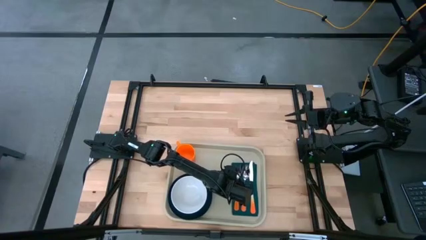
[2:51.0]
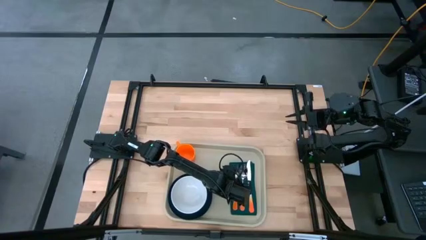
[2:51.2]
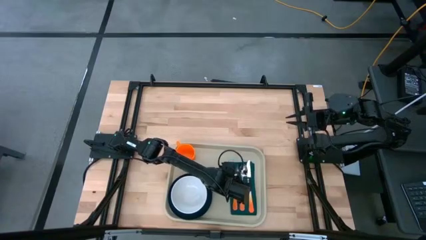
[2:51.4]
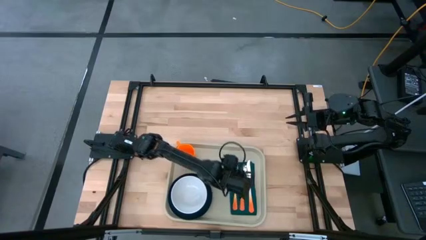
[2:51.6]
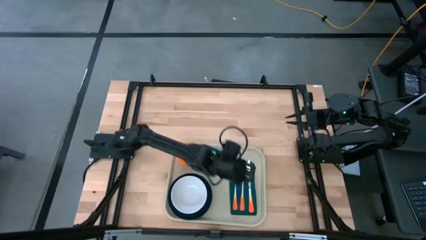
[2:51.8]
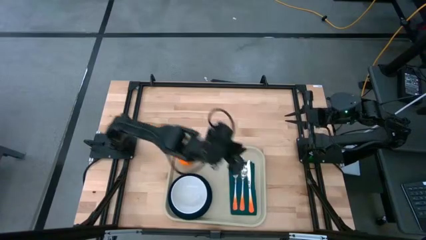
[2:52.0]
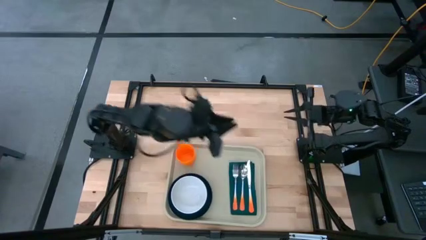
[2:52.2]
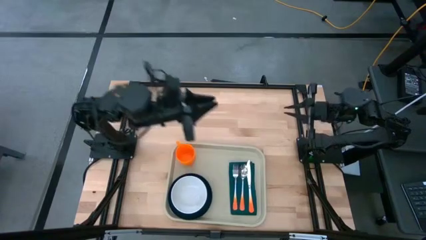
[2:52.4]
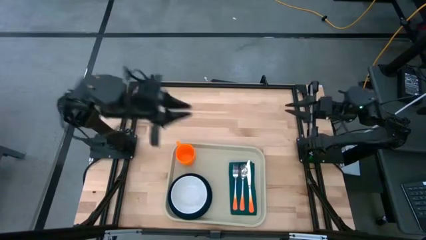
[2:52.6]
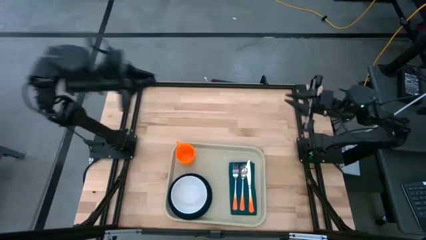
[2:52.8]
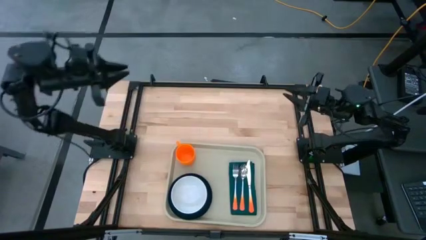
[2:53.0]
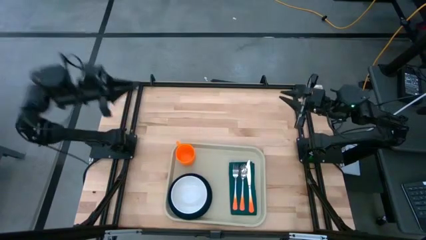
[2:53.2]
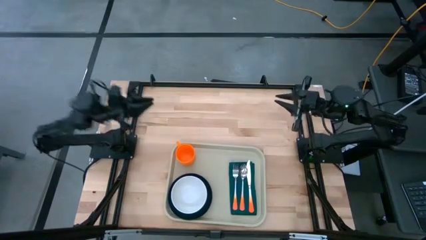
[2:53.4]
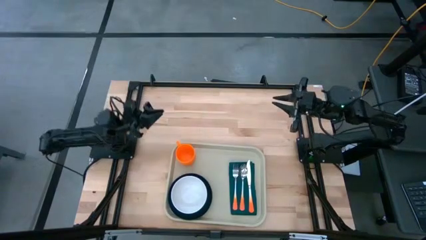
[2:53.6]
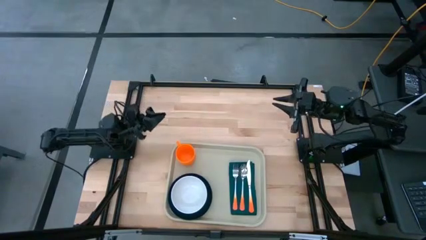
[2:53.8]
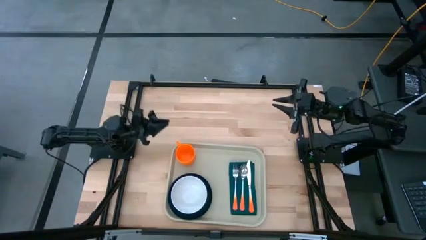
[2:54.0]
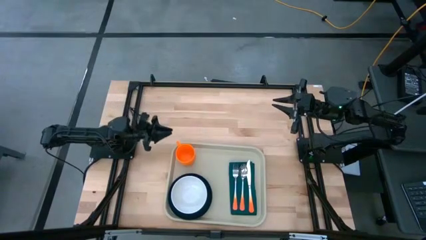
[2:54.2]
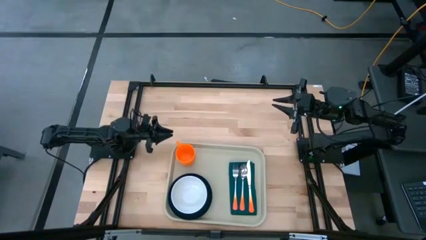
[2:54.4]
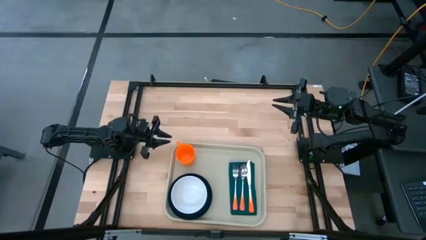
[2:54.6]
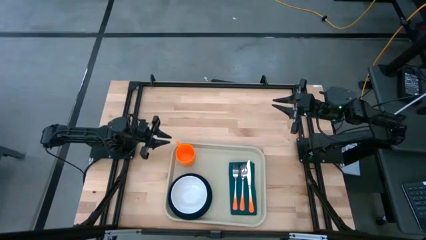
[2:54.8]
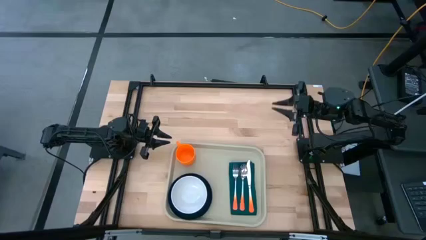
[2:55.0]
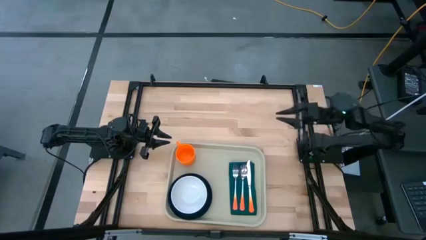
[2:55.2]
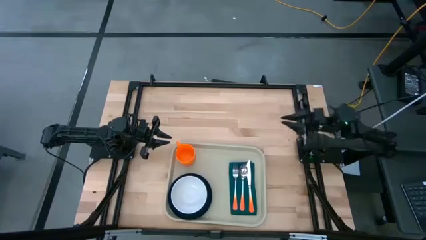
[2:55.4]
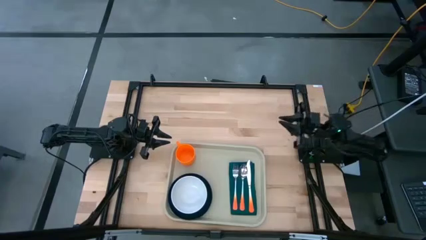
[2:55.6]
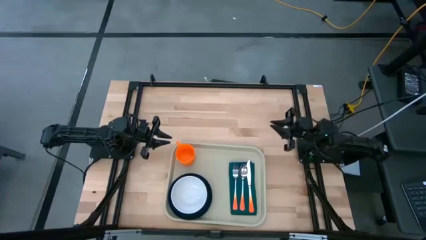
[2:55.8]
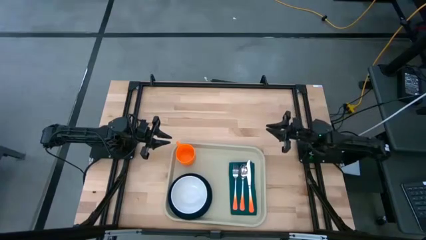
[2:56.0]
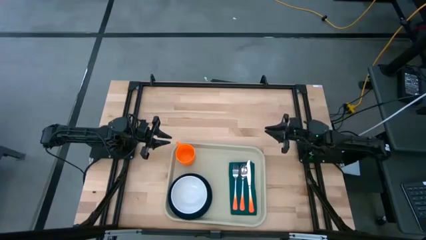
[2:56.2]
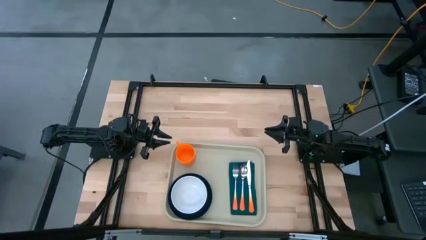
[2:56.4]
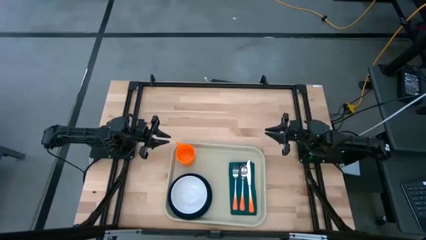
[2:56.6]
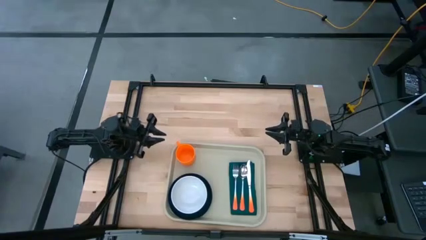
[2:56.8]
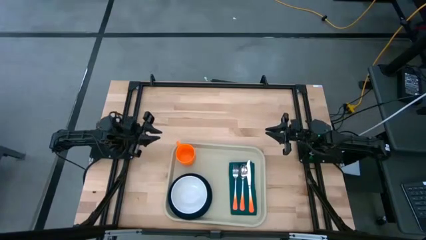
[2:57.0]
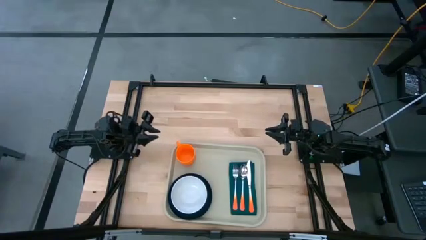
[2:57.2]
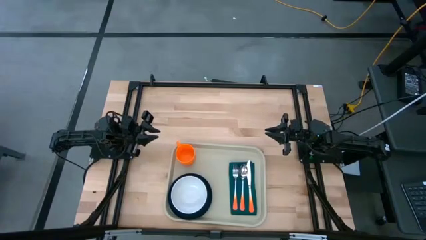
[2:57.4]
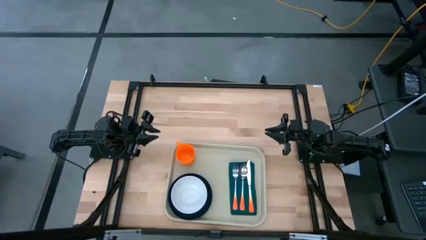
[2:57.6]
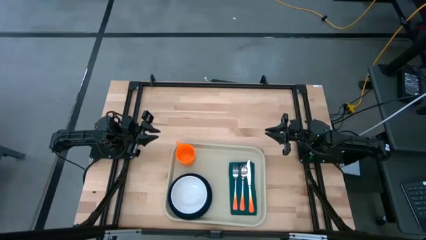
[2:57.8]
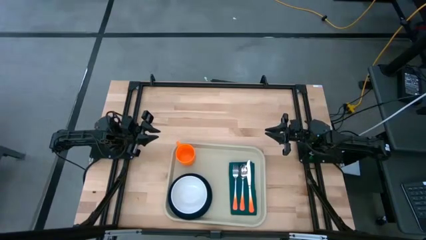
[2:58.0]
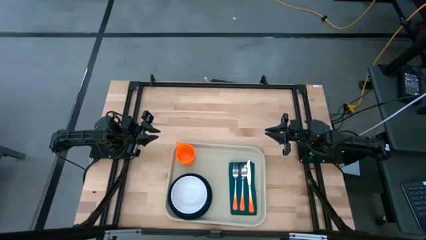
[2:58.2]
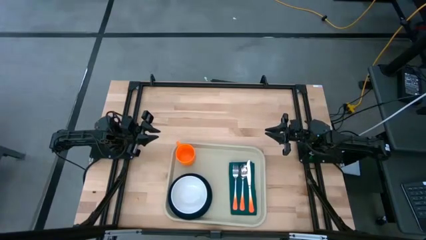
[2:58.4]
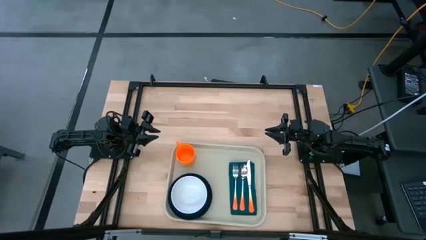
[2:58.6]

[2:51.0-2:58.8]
Task: Set up tray
Return to Home Position

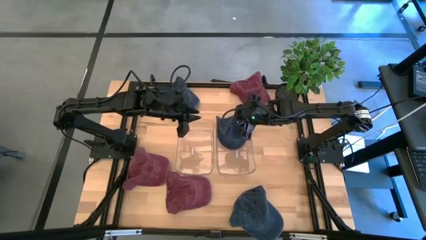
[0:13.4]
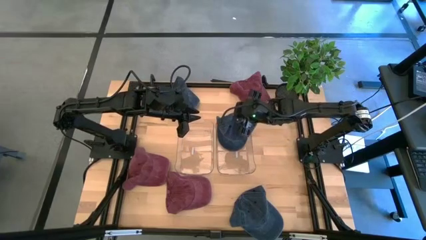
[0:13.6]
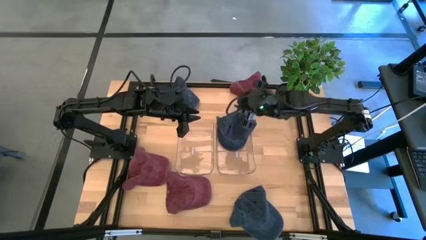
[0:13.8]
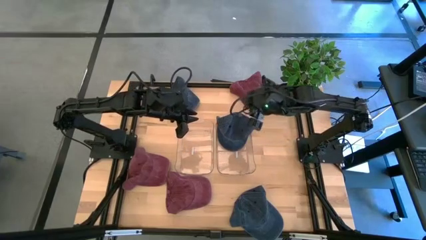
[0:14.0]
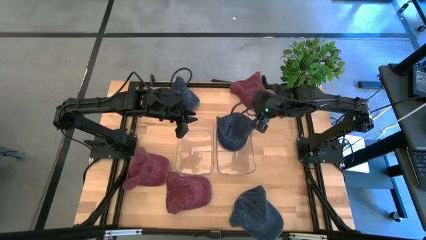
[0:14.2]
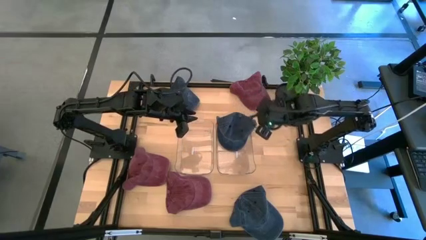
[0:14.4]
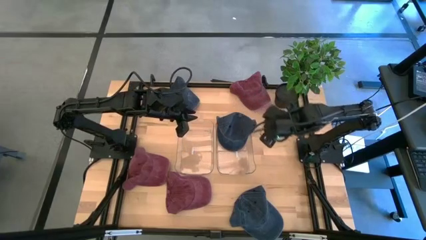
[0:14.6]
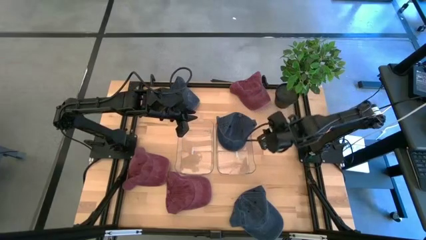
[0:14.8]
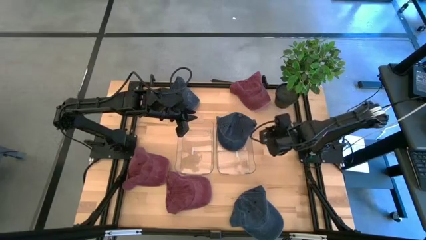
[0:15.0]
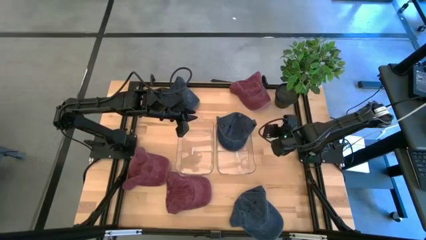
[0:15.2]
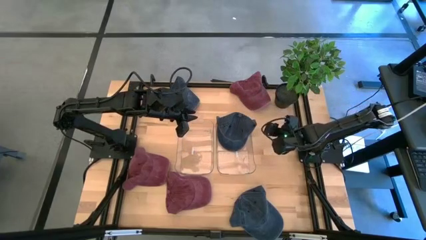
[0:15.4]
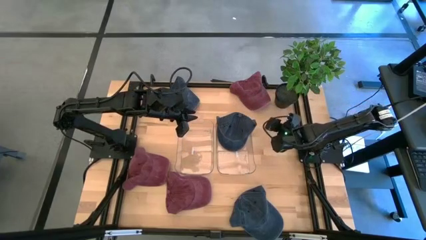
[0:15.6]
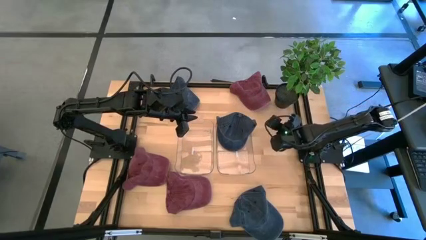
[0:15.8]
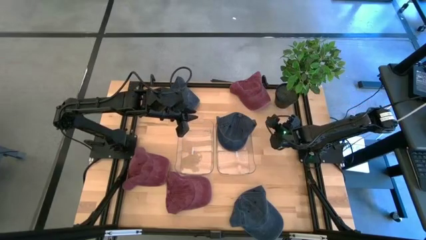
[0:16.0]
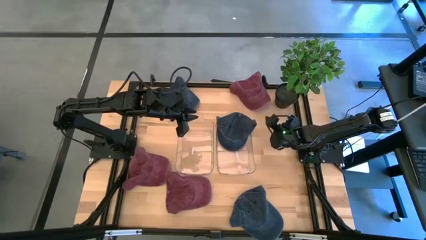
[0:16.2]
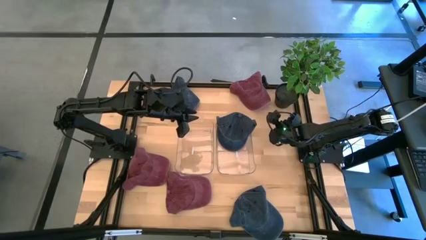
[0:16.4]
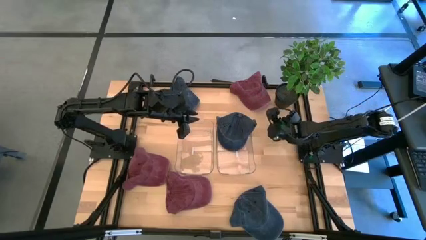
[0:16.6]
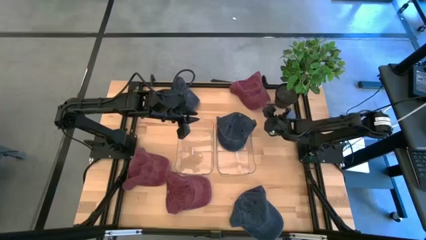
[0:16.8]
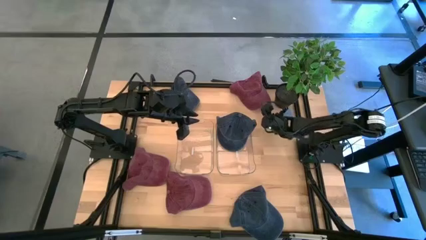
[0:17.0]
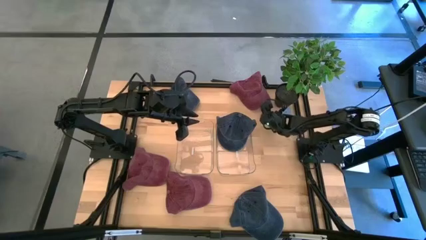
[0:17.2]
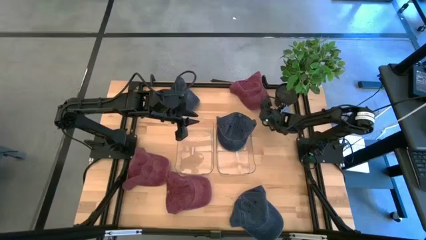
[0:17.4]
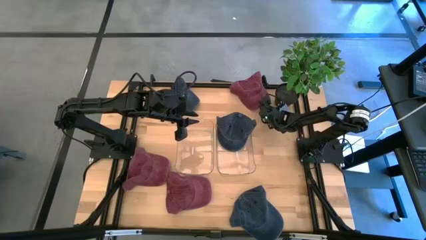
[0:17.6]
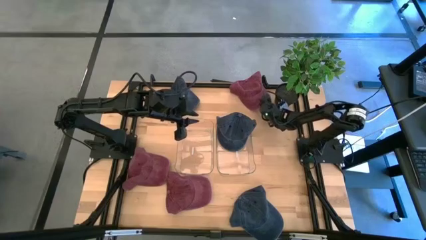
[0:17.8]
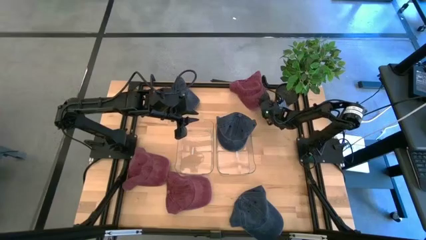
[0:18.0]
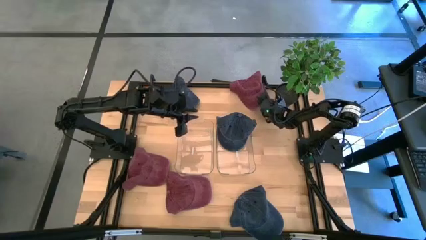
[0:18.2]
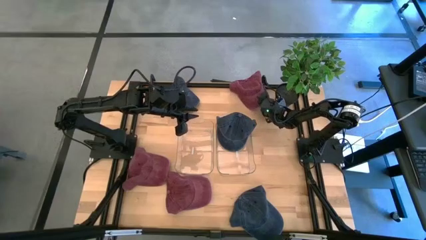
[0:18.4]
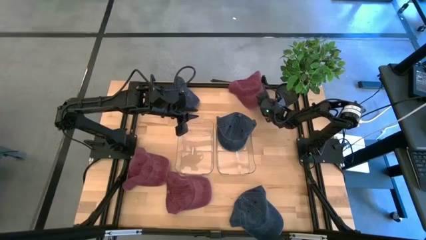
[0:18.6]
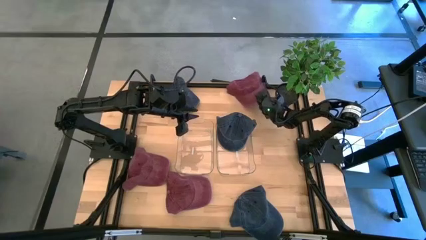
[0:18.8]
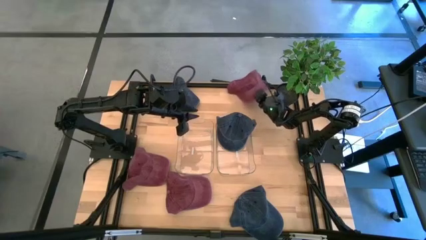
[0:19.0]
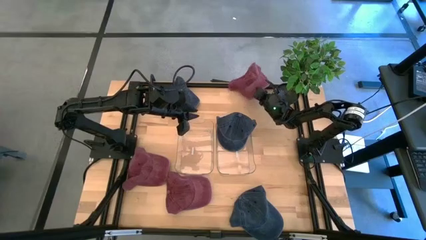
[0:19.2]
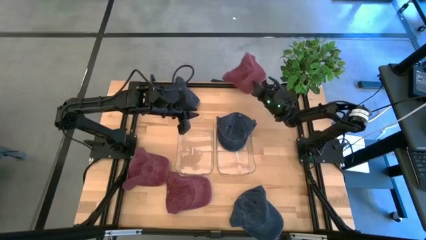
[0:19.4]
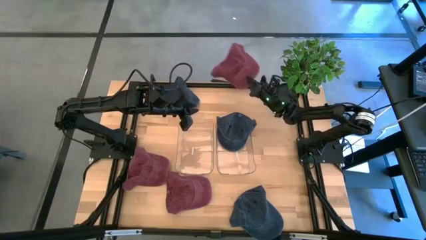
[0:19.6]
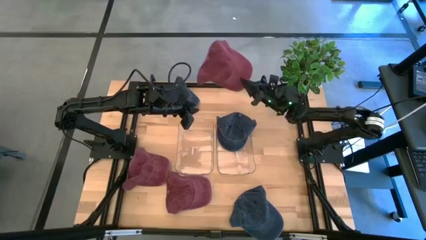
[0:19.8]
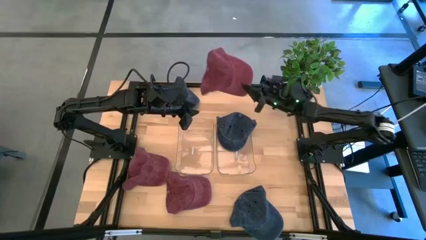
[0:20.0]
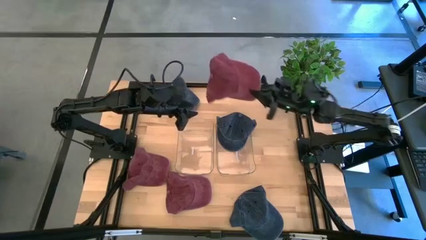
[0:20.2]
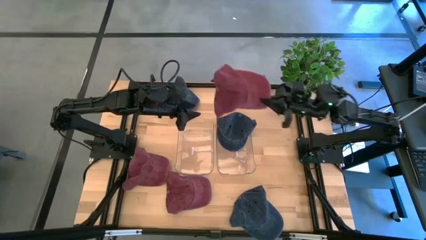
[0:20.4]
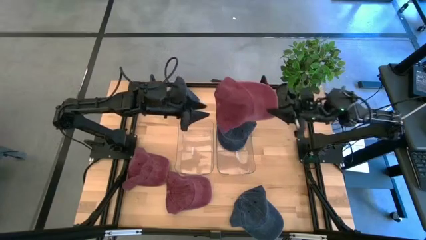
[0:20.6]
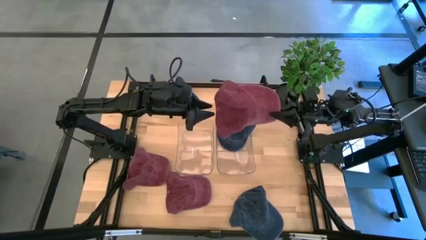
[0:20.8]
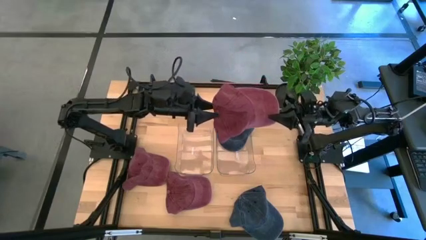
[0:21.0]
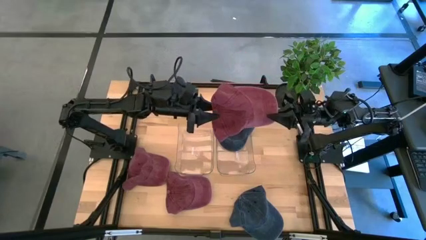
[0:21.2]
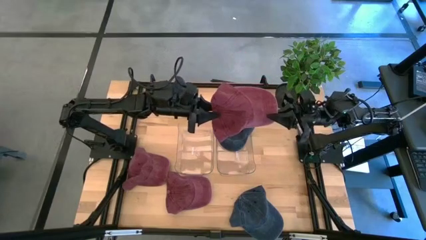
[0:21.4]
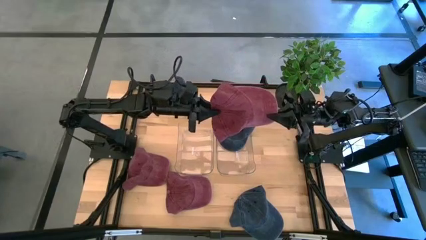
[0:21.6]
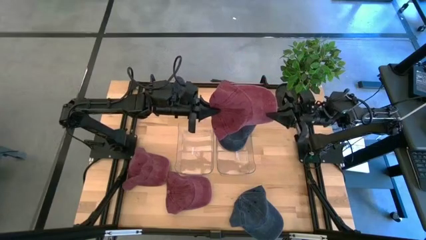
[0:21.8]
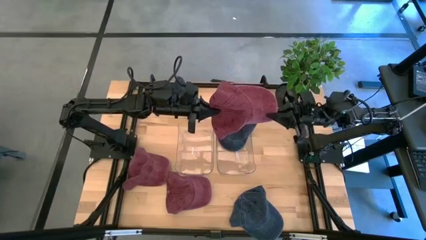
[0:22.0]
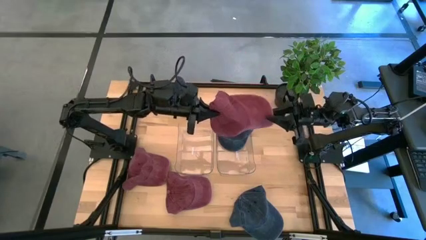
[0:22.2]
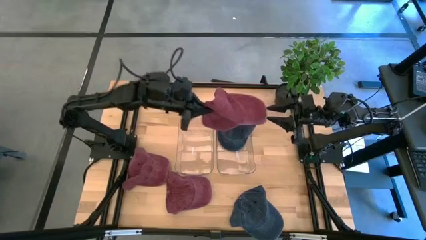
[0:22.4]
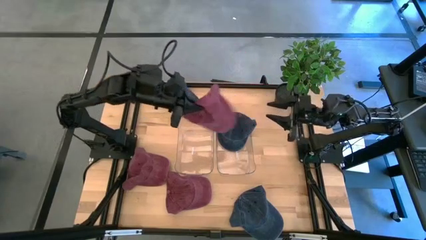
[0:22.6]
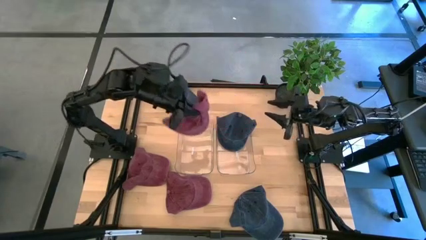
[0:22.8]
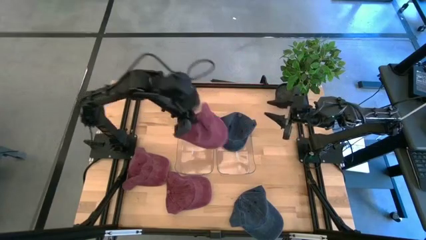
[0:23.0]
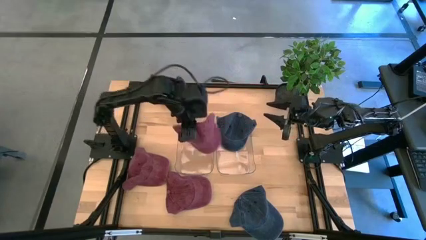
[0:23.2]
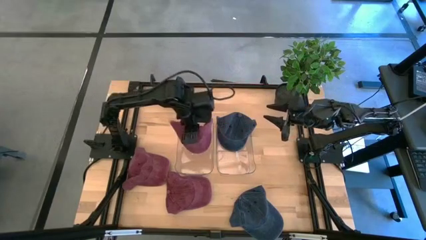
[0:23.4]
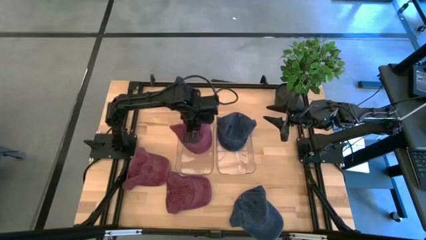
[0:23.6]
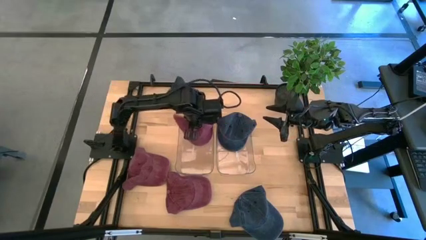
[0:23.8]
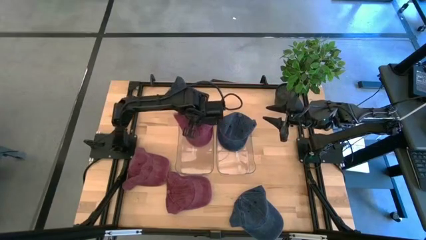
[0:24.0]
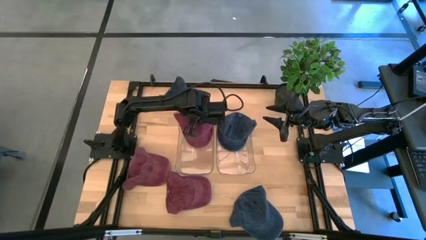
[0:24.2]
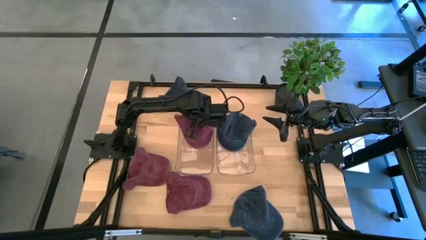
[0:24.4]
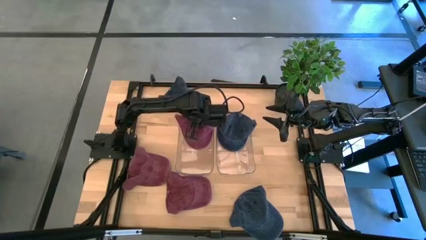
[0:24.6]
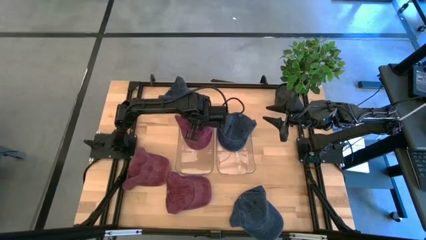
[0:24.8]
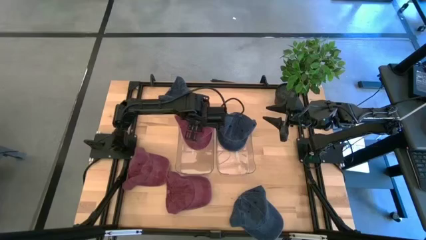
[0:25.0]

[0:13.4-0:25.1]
Task: Pick & Place hat
Put the top right red cap into the left transparent bin
